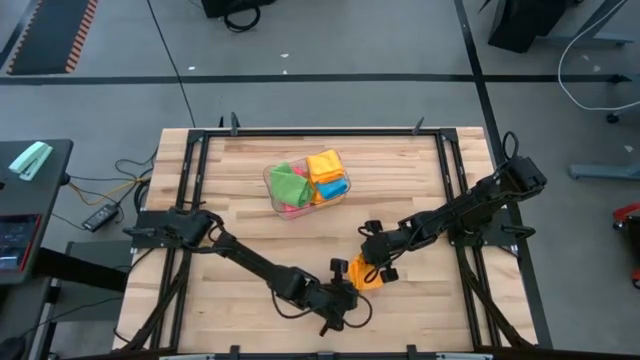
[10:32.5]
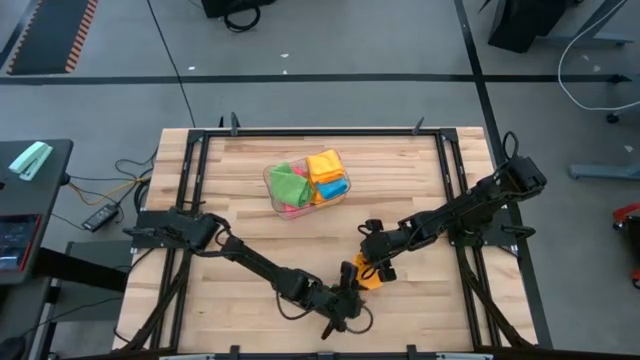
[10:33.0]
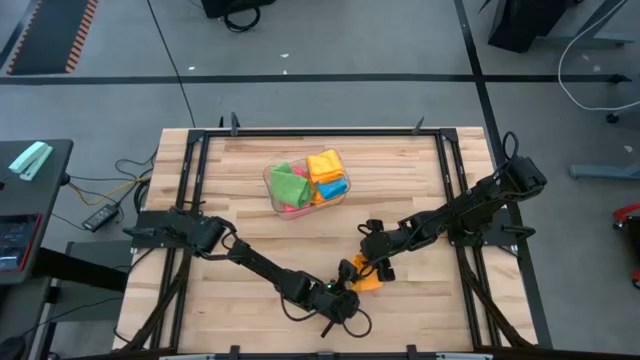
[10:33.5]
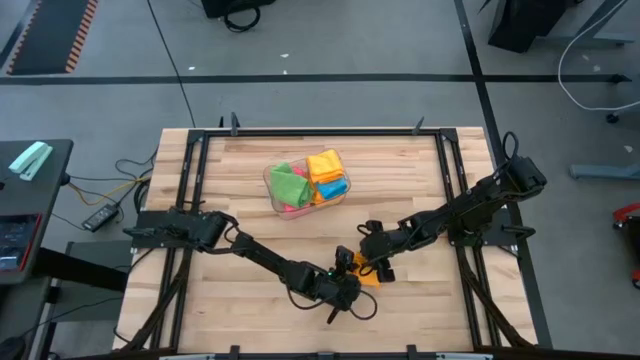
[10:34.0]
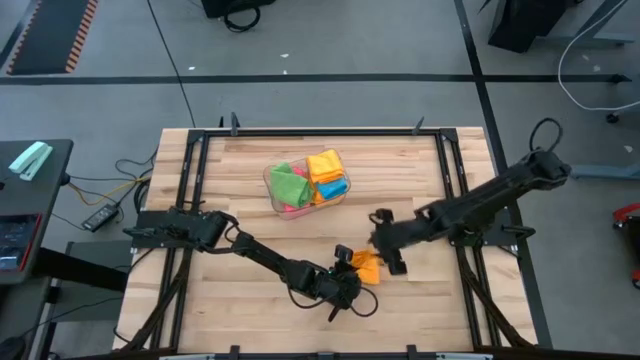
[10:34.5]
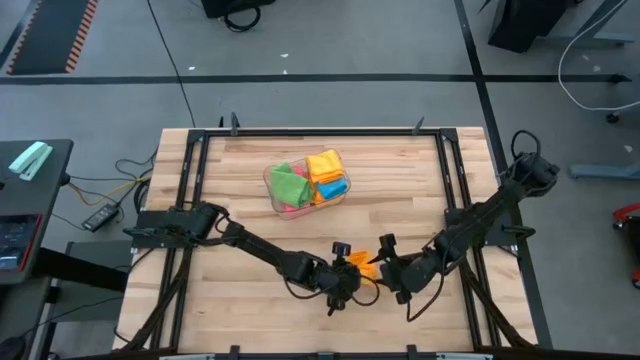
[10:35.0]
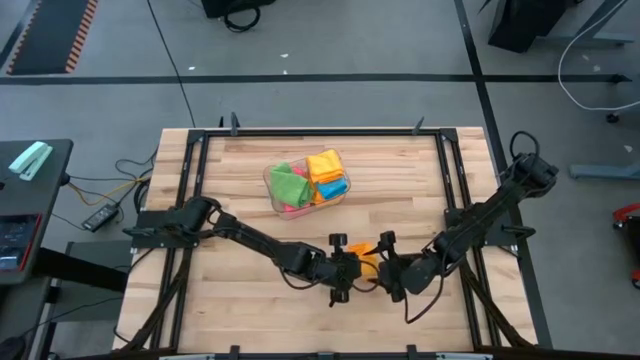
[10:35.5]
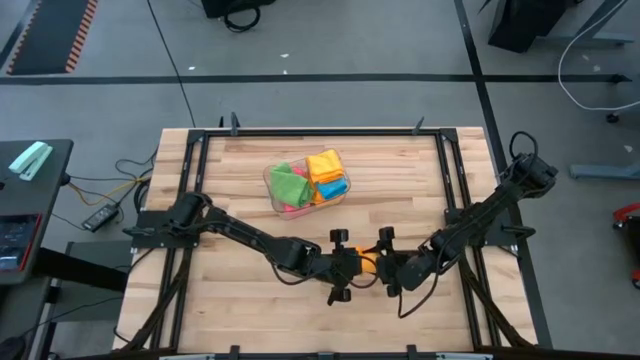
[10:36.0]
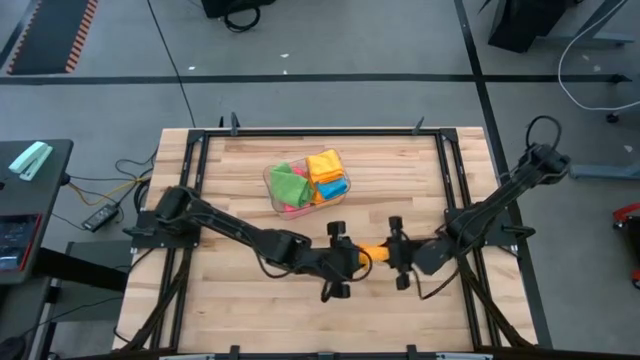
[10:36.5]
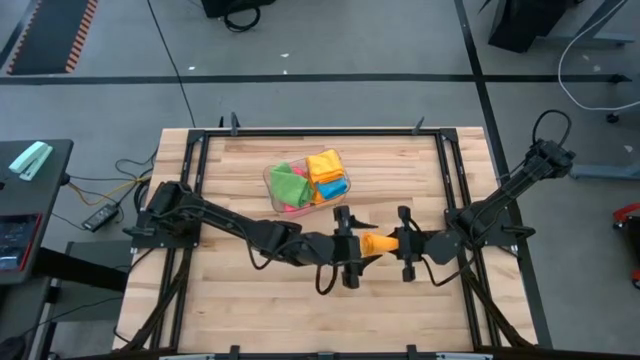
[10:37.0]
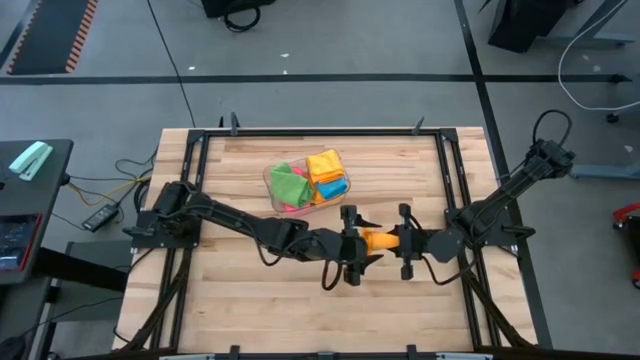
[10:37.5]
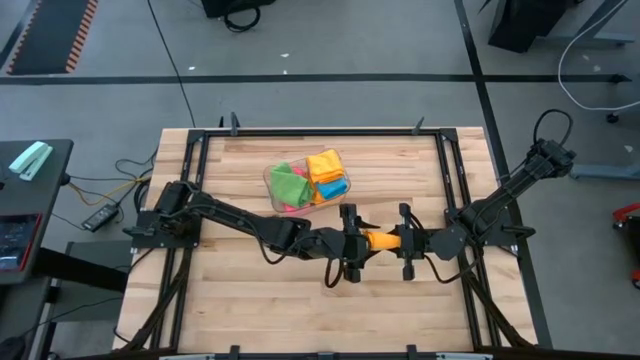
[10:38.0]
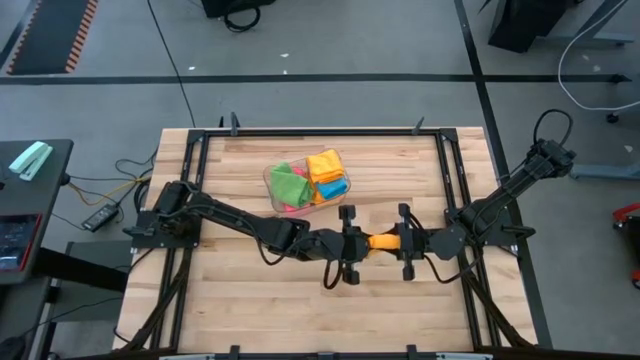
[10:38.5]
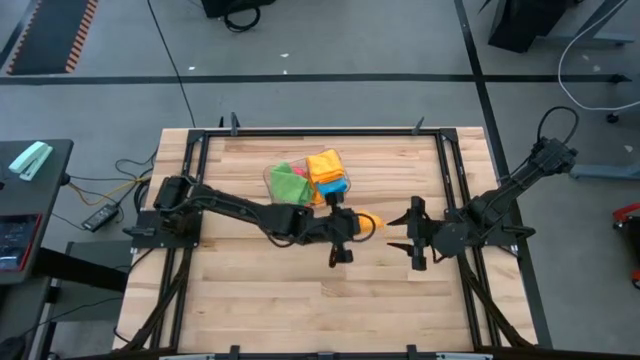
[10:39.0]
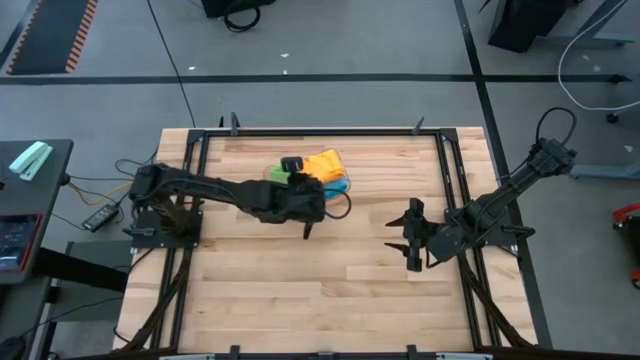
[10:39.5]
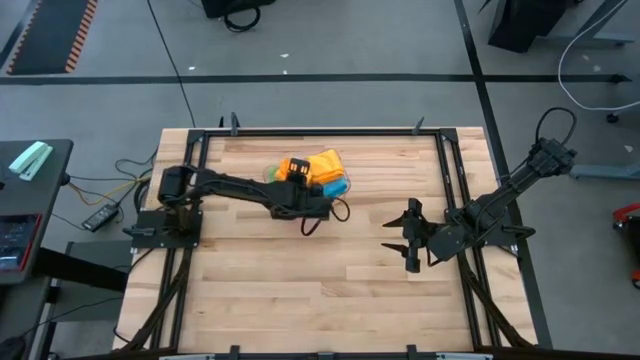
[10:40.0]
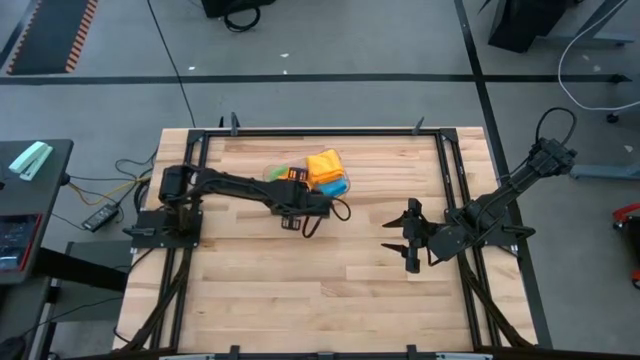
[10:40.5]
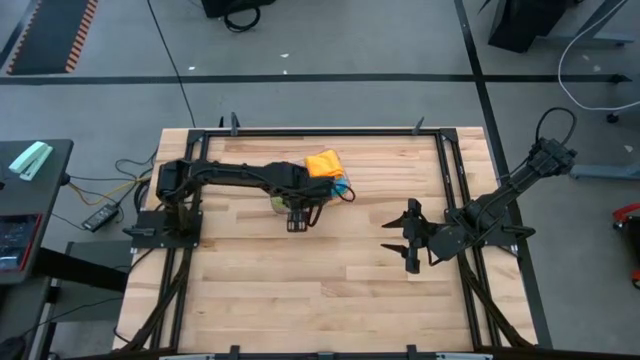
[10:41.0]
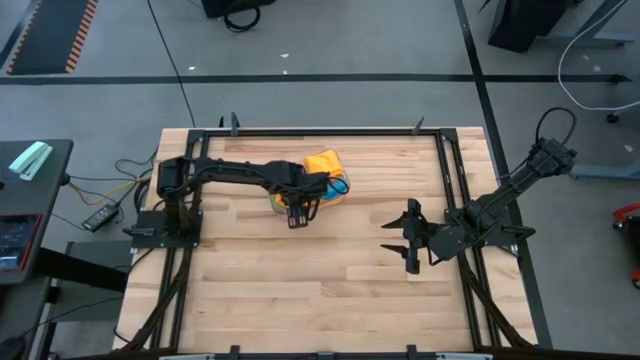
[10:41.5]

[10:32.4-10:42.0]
Task: Fold microfiber towels
Put the folded orange microfiber cloth into the transparent bin

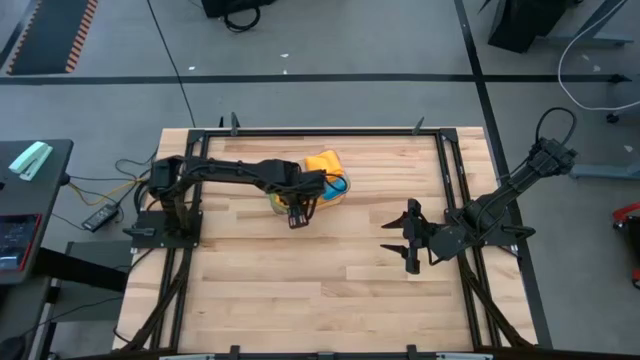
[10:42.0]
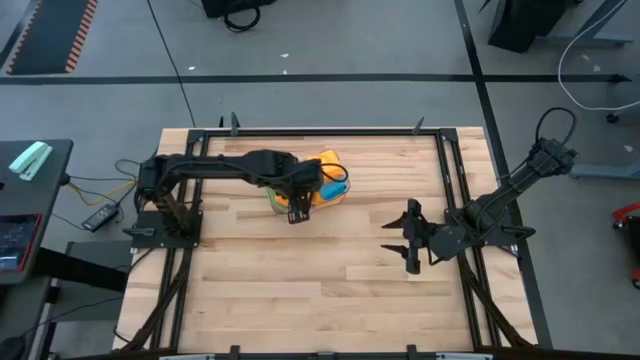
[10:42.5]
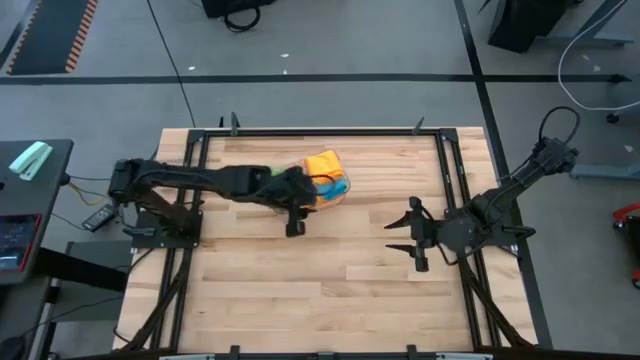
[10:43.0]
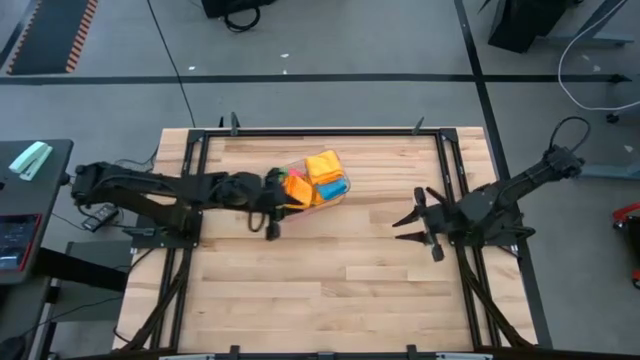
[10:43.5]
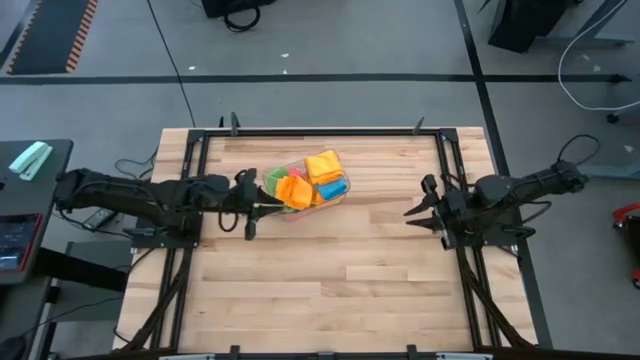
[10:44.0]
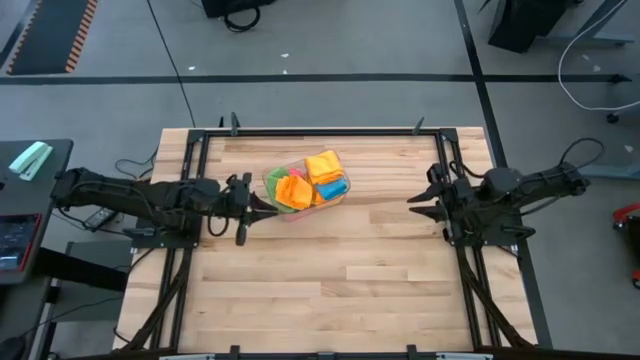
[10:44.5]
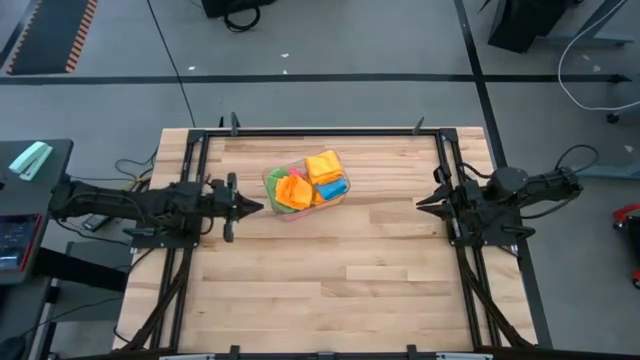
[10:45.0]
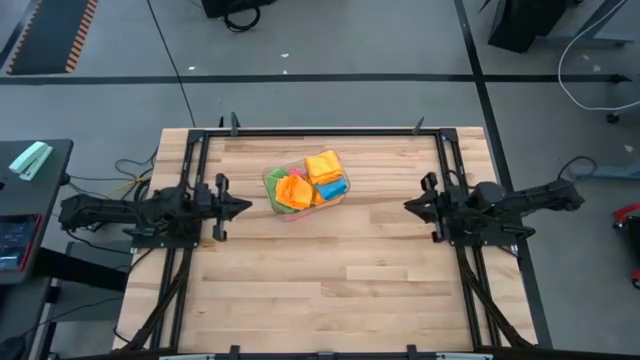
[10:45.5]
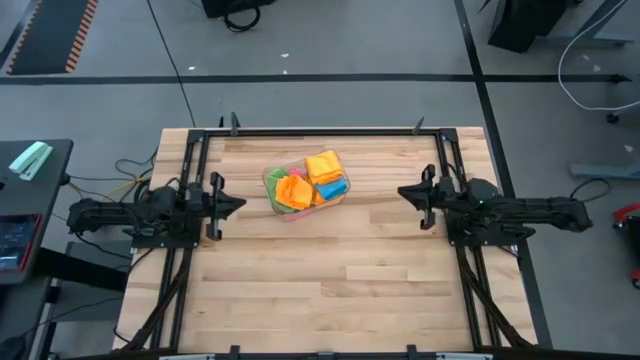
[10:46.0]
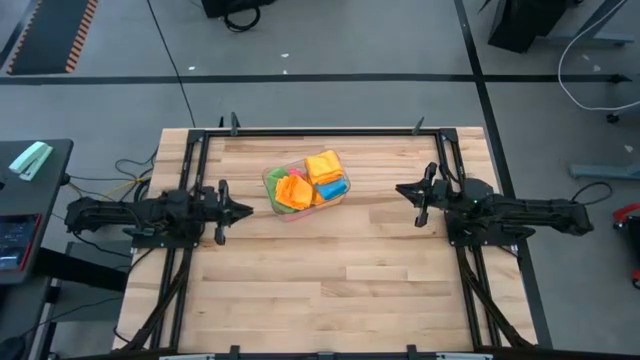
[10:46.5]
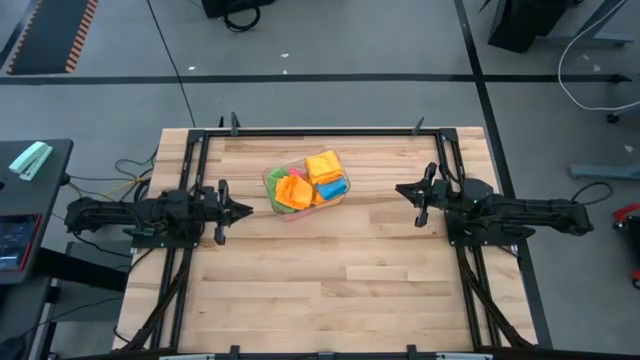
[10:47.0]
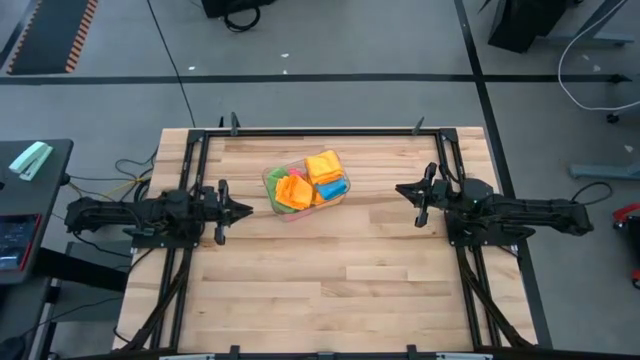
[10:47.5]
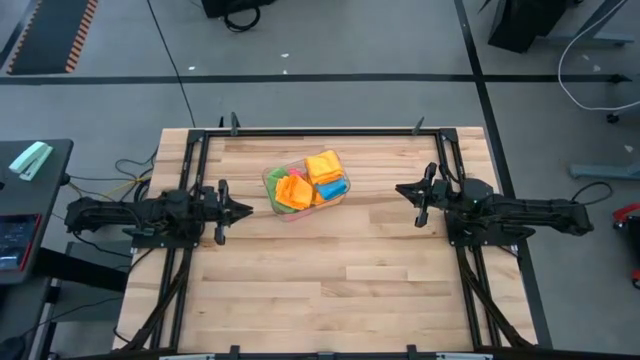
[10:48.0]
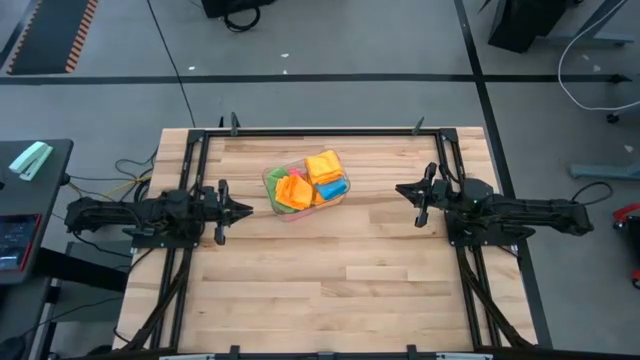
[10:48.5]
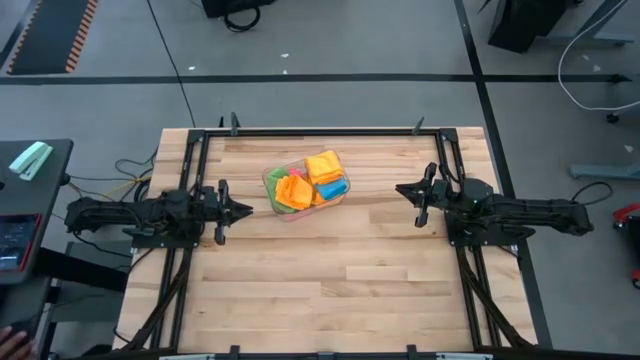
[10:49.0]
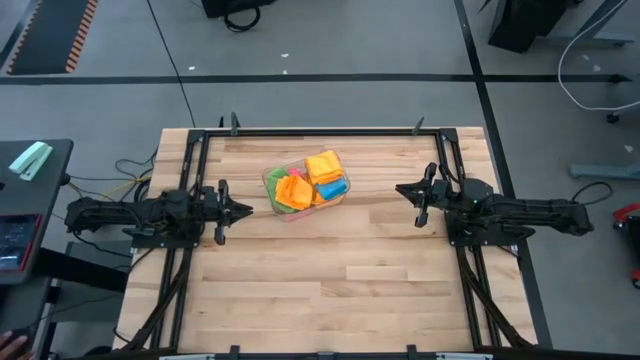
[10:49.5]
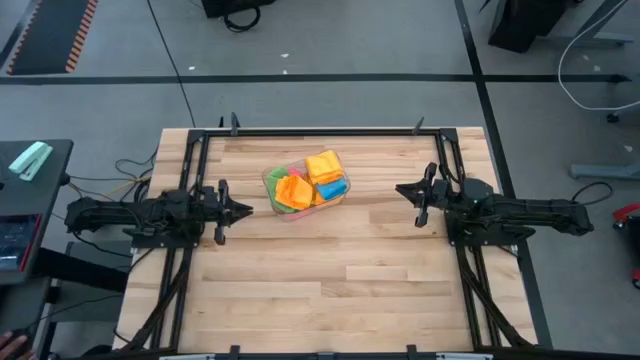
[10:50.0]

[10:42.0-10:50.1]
Return to Home Position
